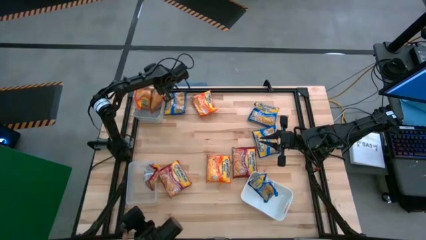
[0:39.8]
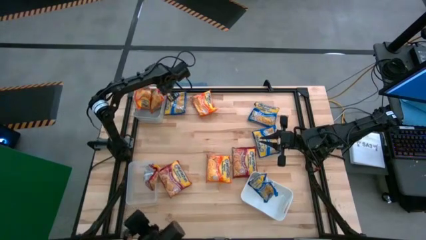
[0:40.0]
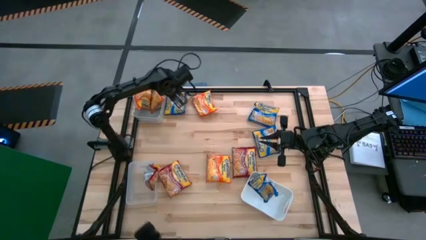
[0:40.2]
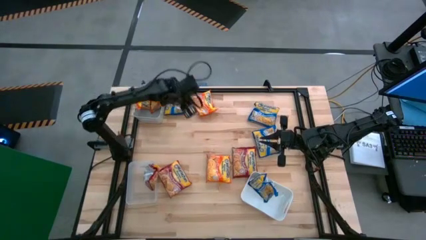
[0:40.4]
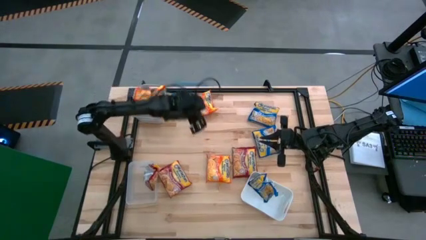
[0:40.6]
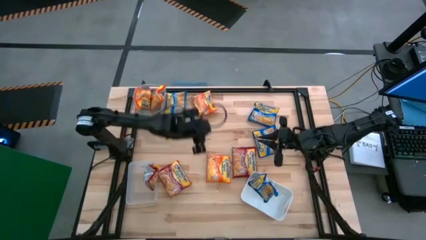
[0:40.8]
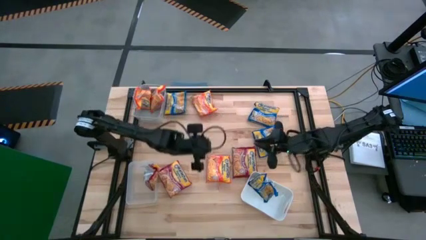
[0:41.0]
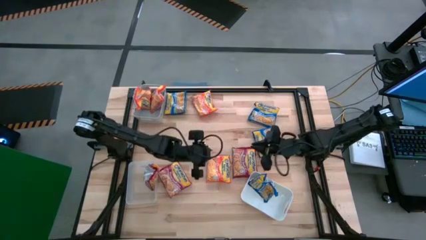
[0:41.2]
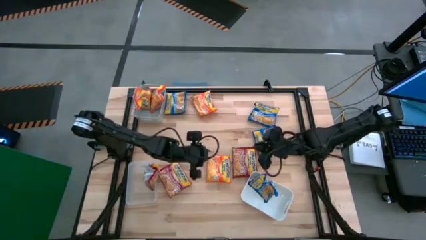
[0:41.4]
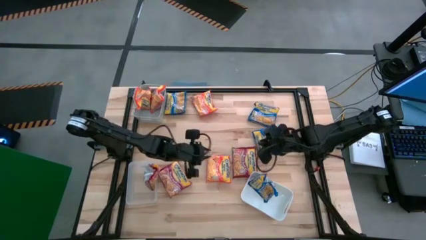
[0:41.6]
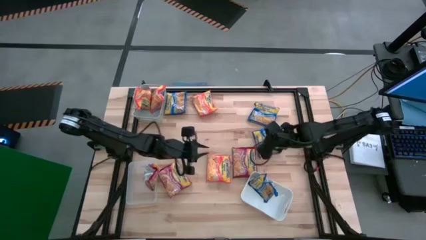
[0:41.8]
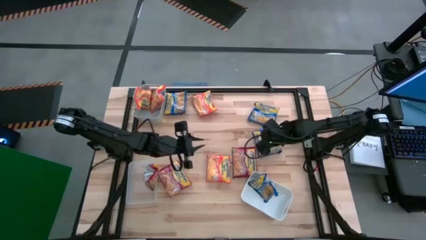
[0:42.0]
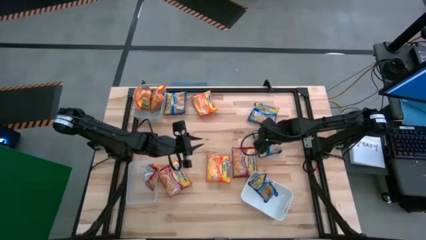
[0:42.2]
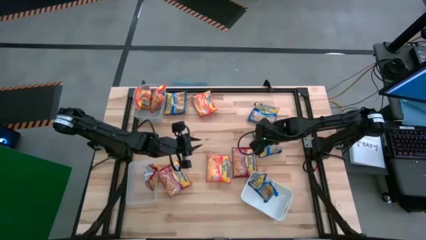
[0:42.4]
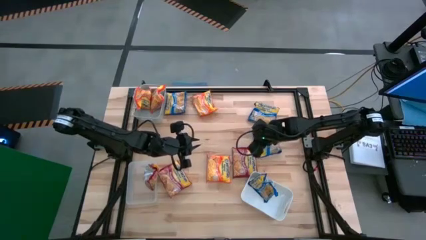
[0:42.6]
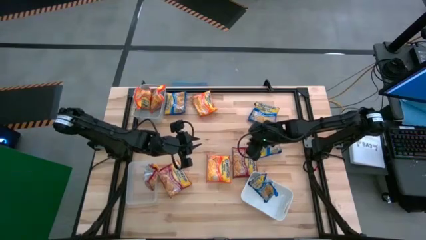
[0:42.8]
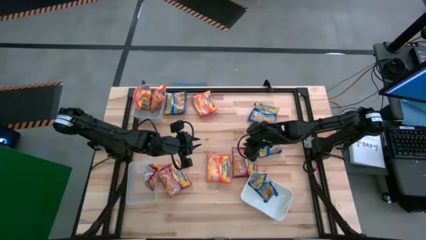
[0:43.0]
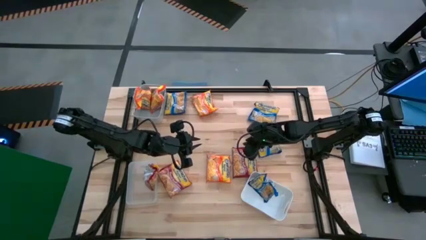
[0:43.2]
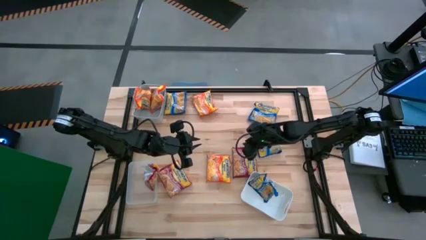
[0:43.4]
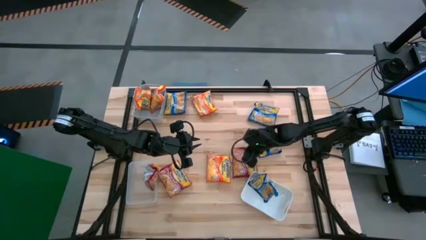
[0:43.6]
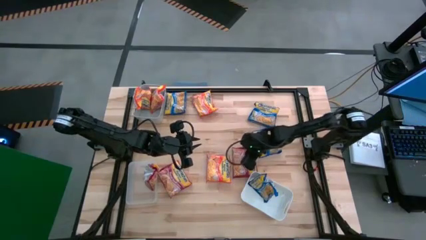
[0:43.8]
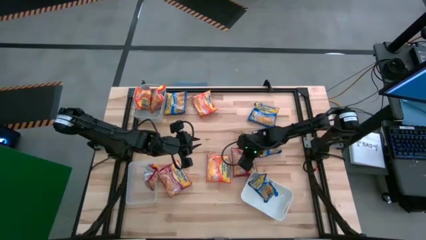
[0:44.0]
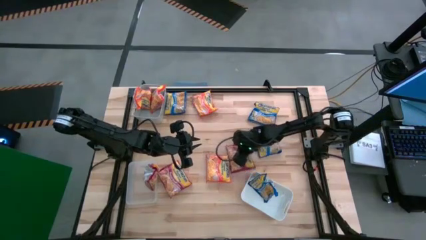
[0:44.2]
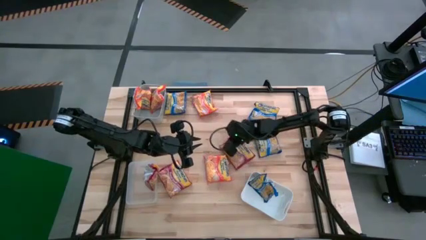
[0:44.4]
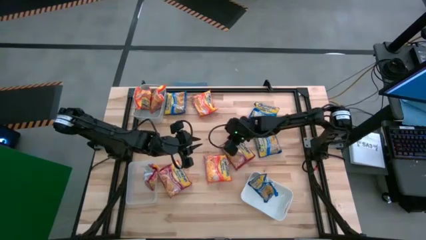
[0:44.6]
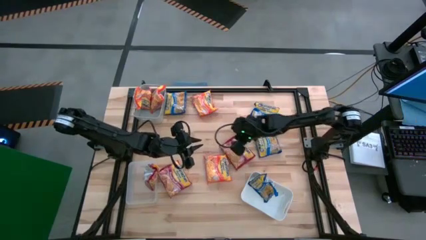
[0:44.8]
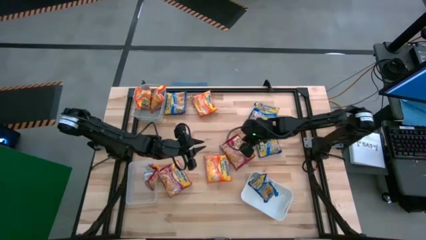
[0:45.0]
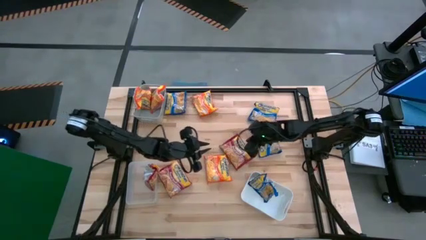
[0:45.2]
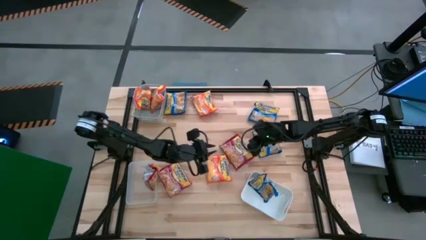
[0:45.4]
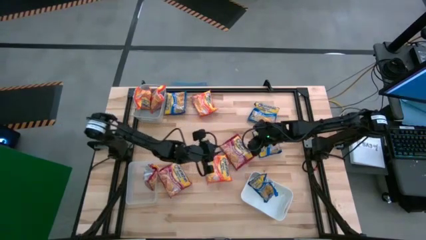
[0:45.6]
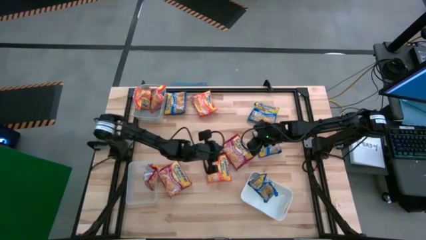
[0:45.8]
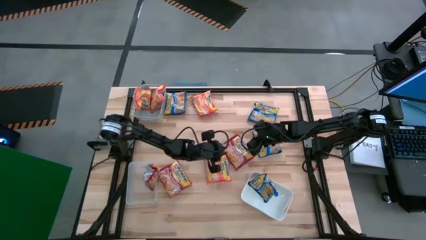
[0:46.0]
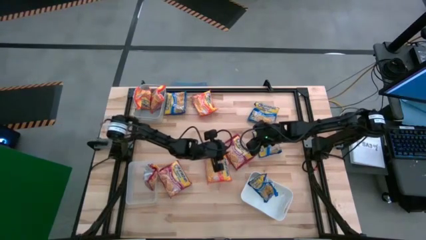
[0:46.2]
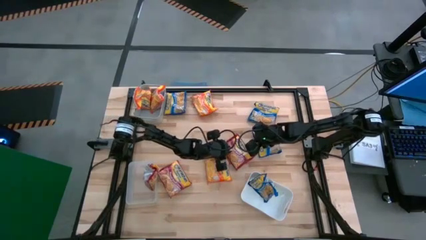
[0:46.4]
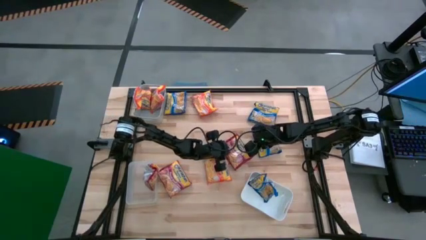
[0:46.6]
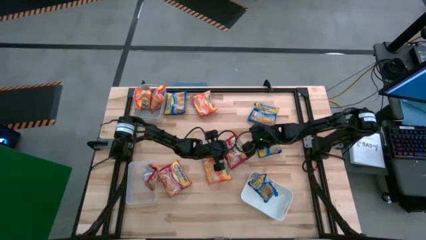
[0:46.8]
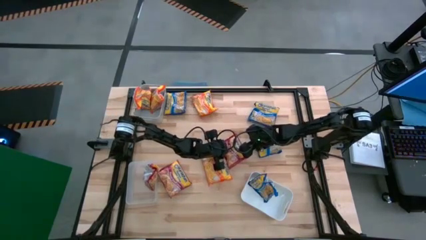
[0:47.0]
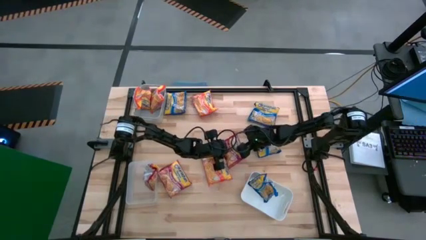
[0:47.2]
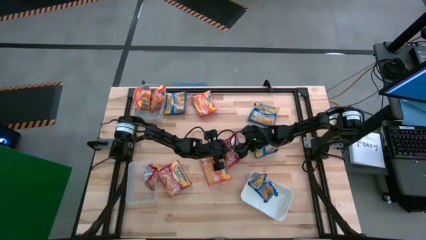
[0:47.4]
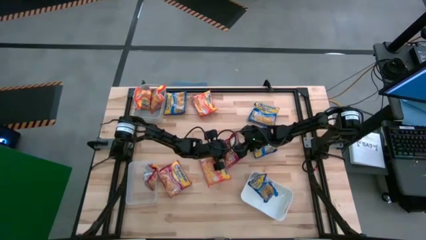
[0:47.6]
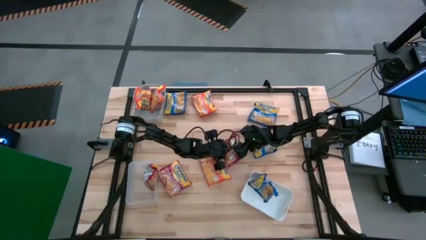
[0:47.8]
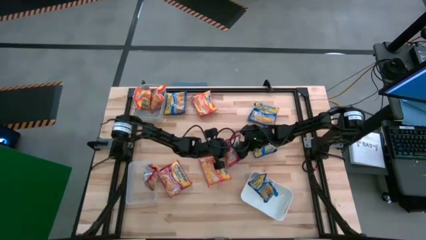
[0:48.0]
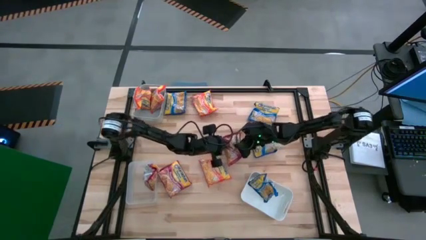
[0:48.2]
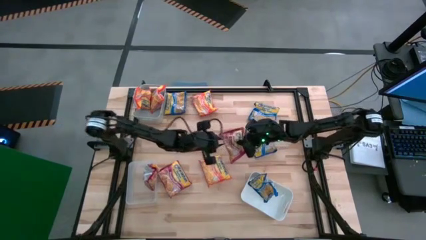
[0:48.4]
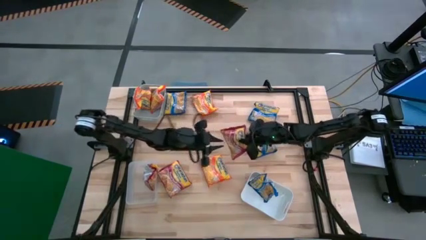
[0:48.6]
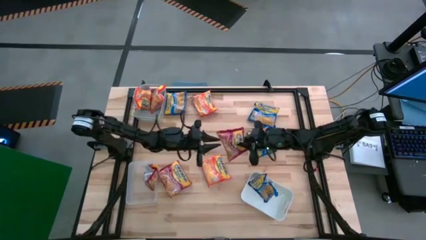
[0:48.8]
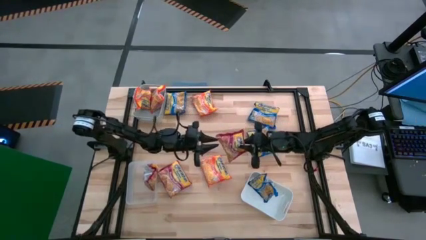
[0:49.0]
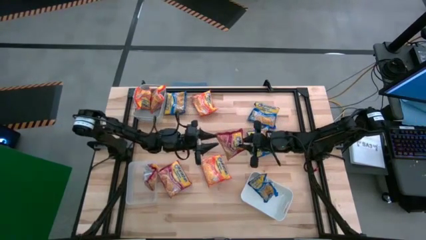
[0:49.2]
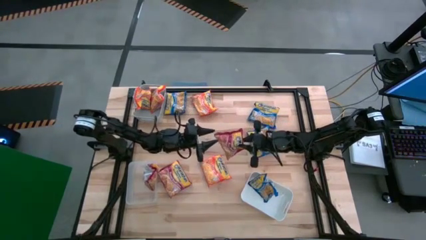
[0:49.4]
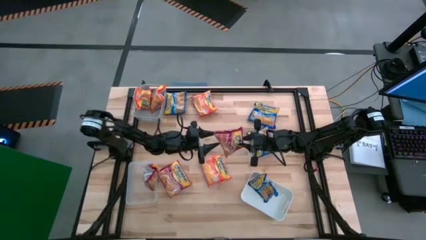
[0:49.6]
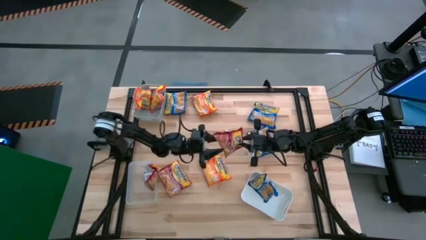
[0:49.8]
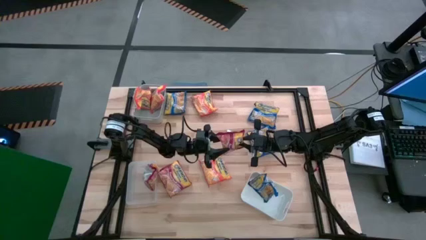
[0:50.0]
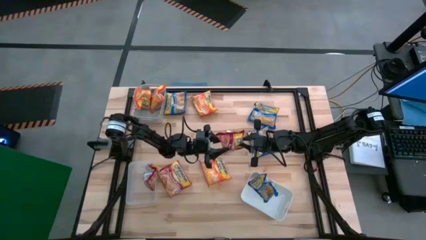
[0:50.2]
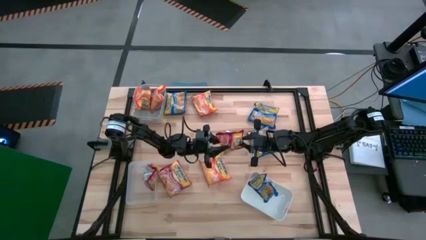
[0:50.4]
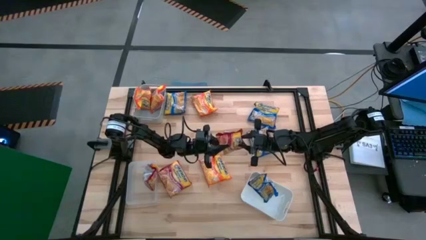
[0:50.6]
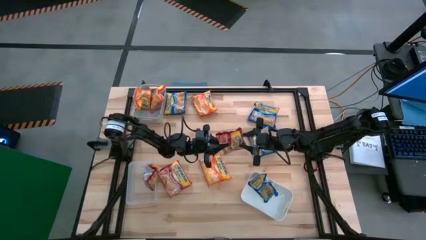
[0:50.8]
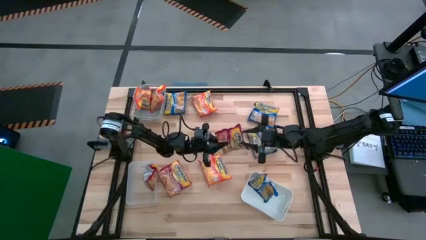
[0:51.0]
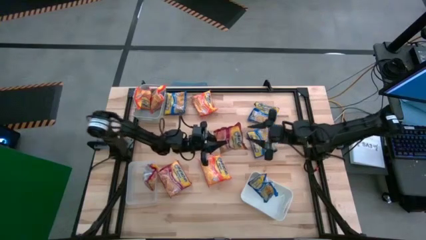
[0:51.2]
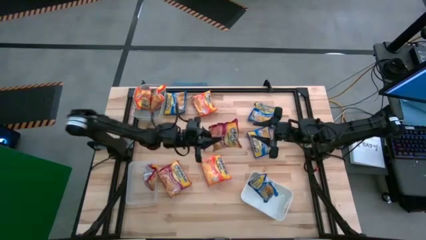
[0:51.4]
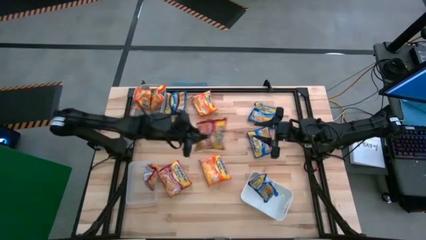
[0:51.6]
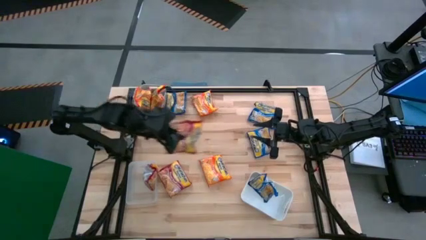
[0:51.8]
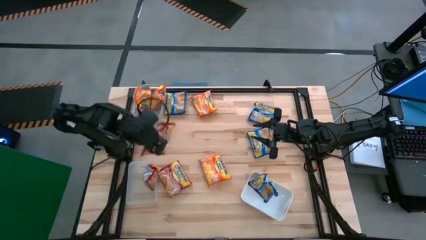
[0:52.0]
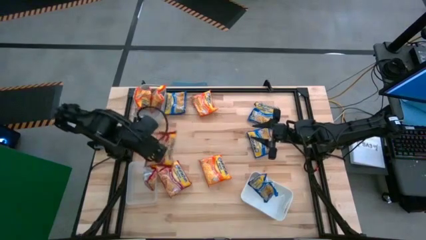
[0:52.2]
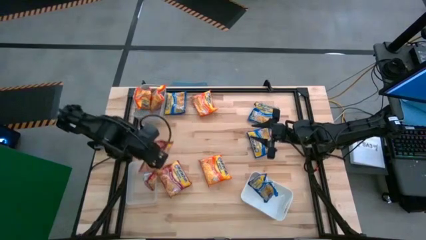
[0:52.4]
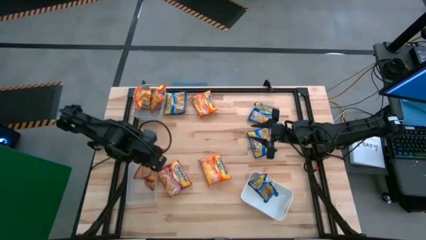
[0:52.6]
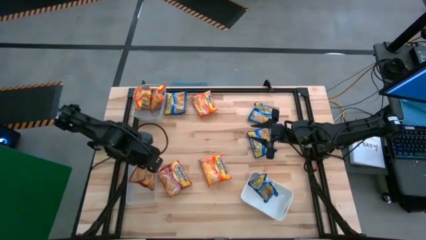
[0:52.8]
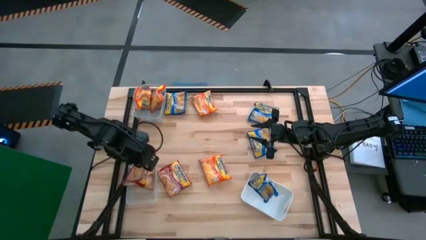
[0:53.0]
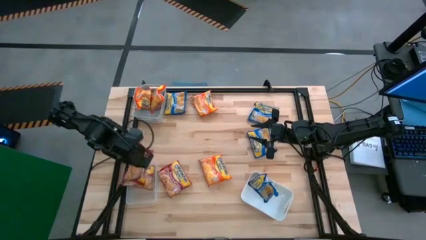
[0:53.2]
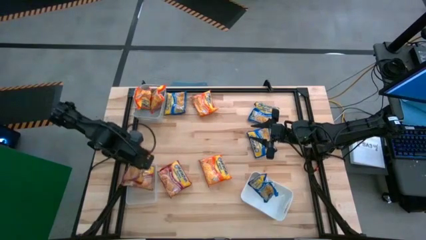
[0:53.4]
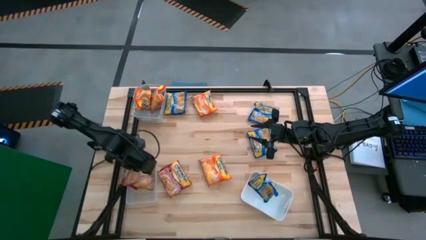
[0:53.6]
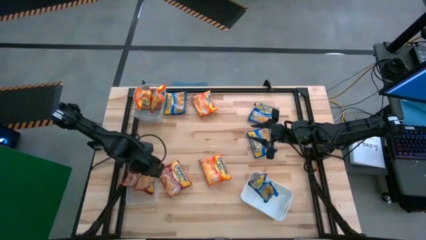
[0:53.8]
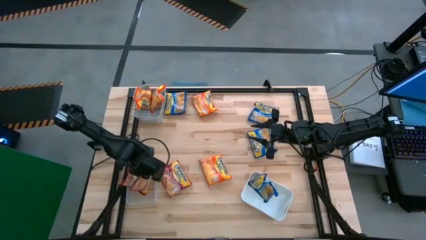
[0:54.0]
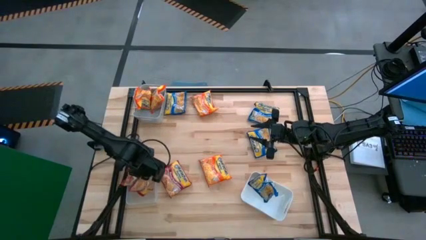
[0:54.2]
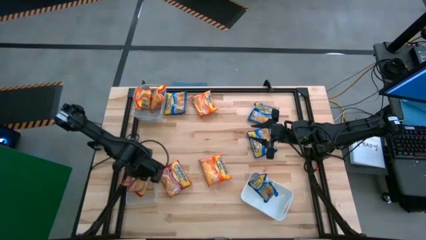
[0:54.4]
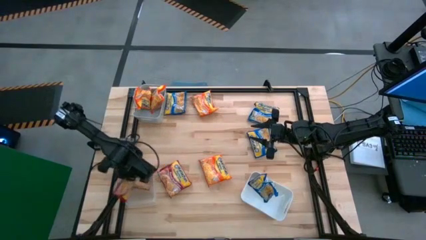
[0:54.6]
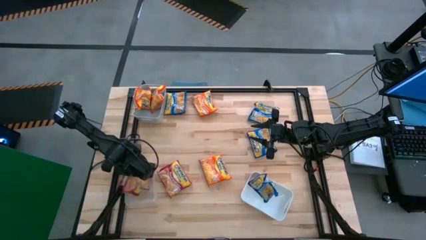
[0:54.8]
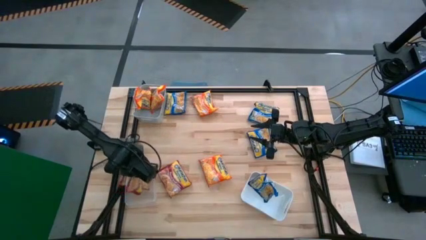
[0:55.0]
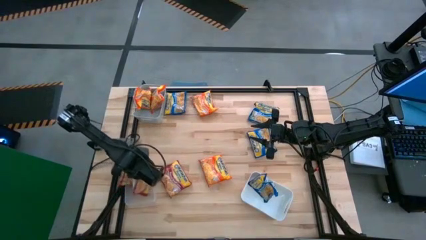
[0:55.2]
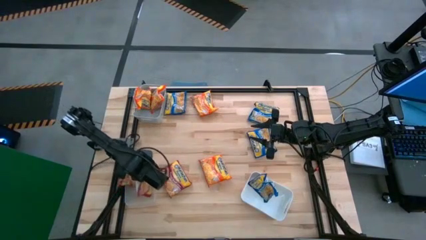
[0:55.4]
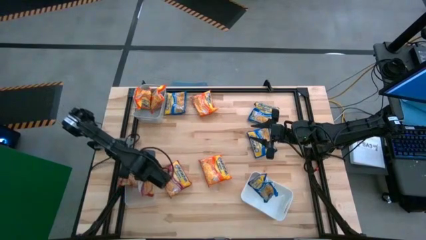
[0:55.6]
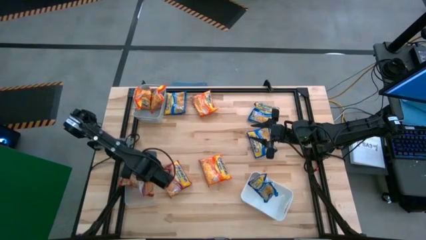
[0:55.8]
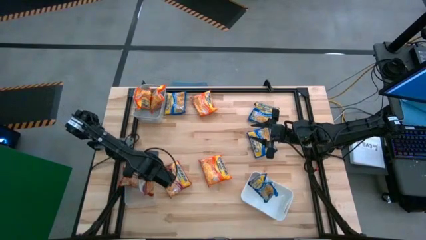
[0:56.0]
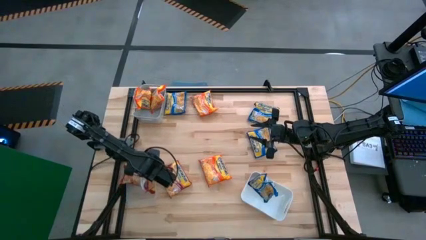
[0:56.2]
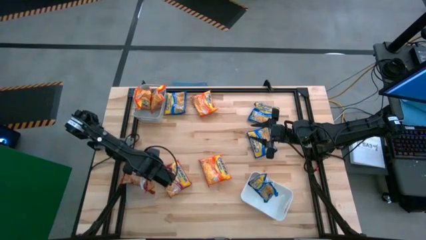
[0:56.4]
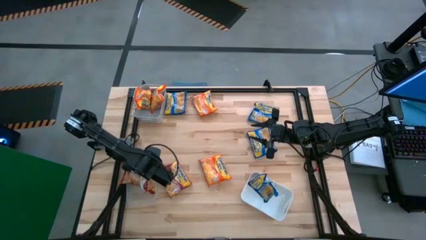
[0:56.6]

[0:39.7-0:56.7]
Task: Sort Maruchan noodles
Put the red noodle pack into the transparent bin
